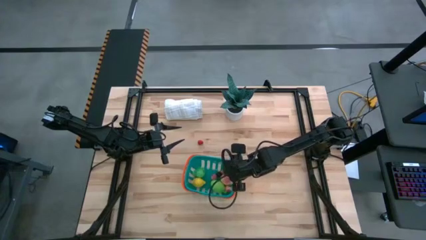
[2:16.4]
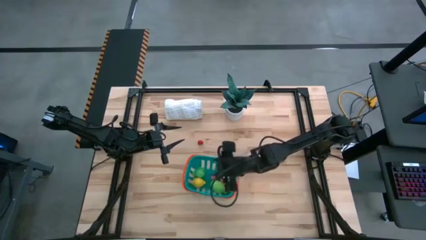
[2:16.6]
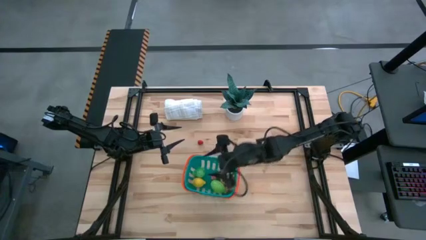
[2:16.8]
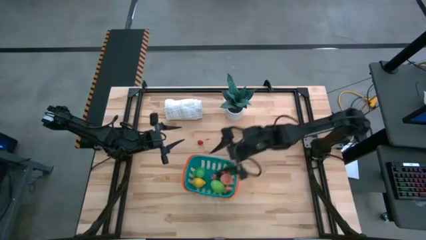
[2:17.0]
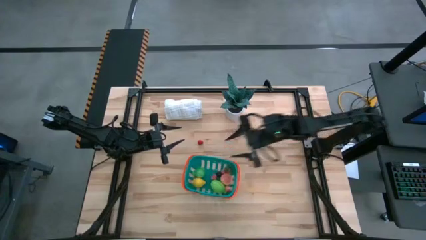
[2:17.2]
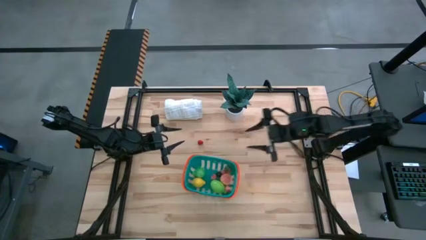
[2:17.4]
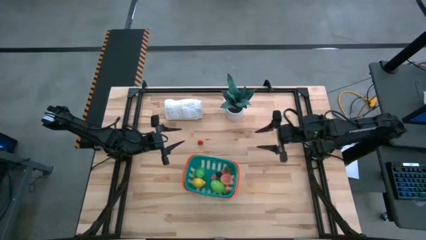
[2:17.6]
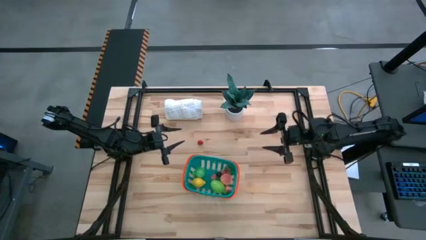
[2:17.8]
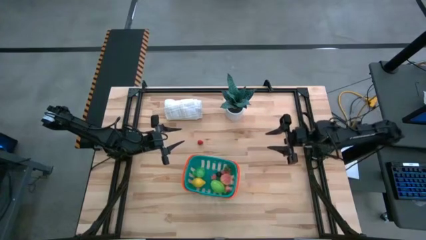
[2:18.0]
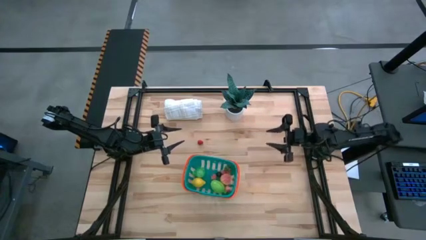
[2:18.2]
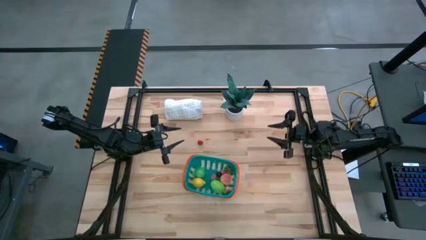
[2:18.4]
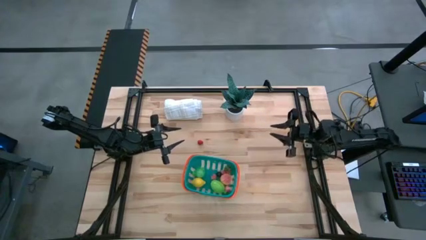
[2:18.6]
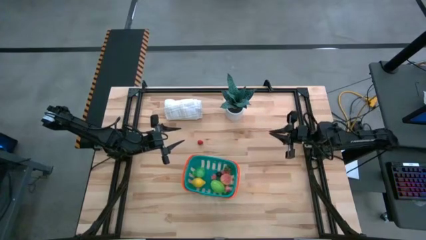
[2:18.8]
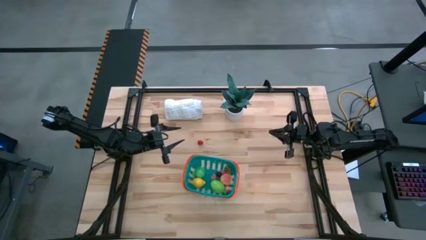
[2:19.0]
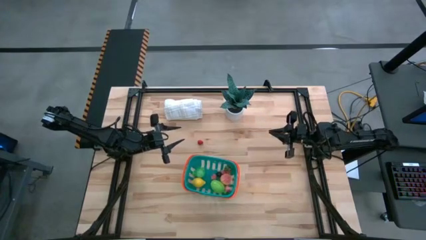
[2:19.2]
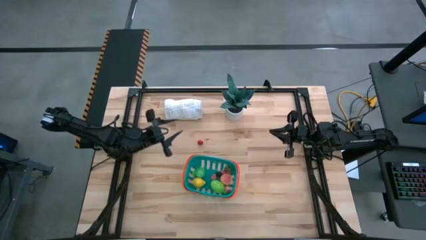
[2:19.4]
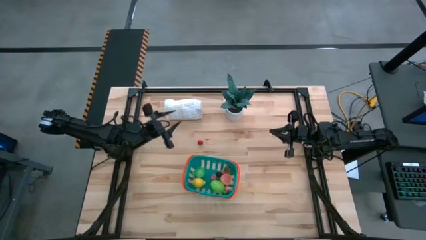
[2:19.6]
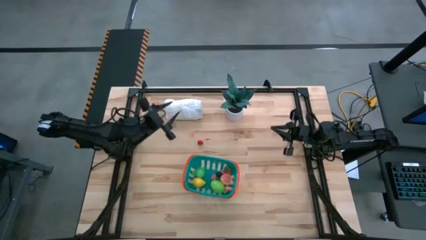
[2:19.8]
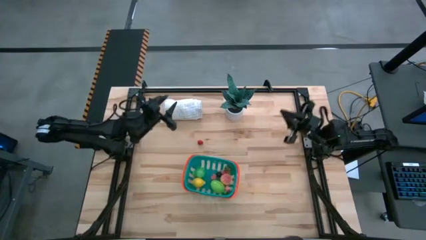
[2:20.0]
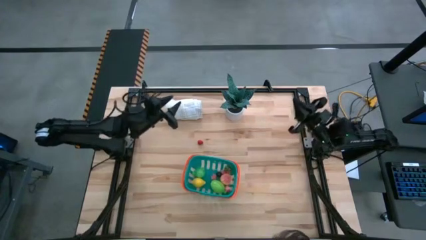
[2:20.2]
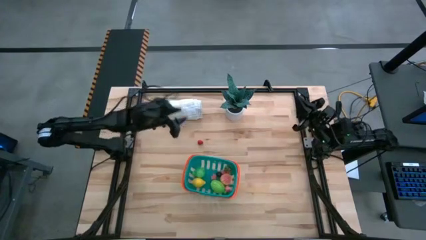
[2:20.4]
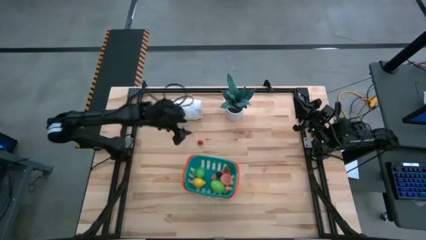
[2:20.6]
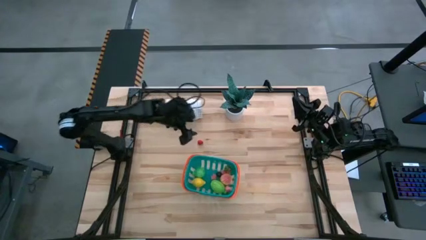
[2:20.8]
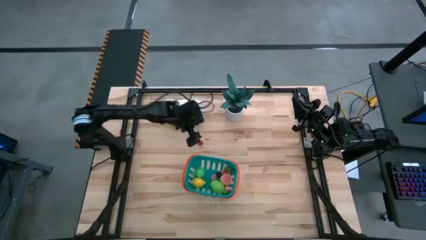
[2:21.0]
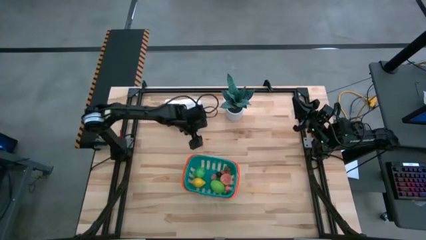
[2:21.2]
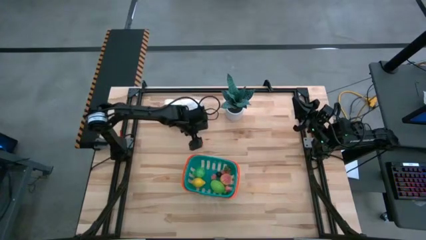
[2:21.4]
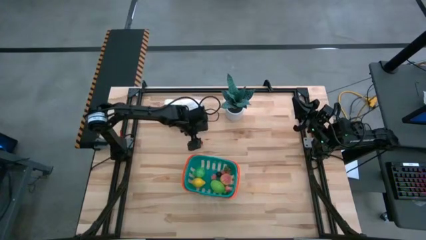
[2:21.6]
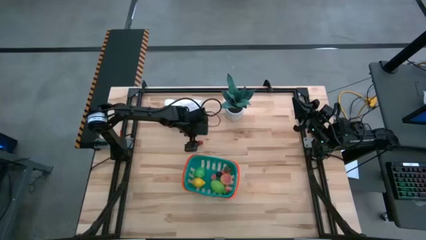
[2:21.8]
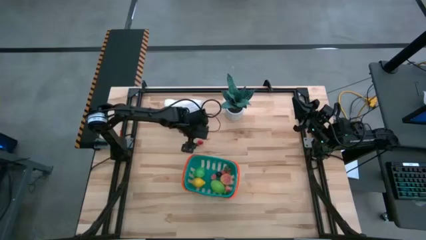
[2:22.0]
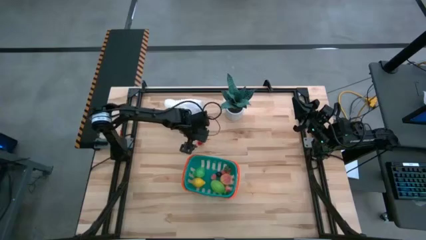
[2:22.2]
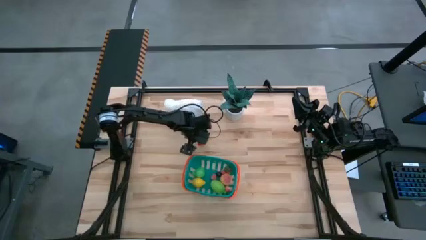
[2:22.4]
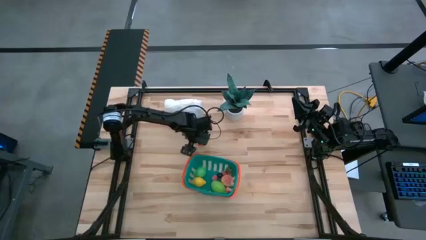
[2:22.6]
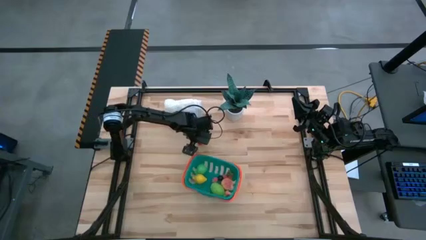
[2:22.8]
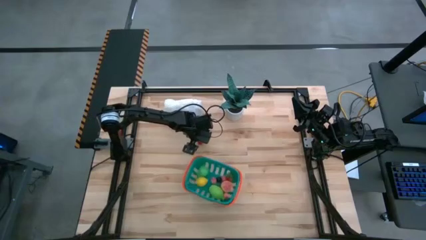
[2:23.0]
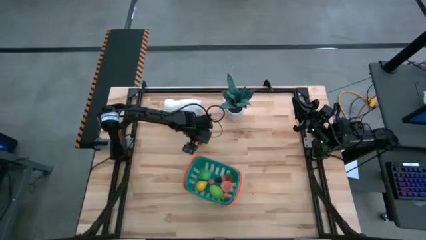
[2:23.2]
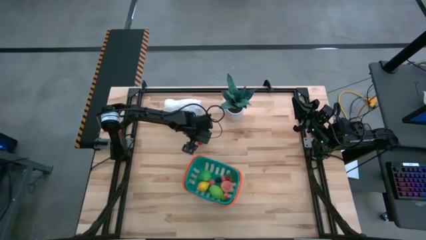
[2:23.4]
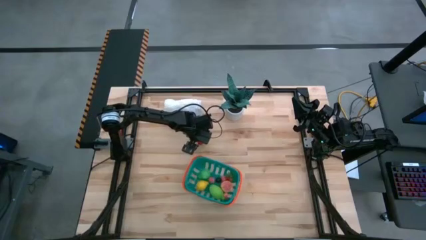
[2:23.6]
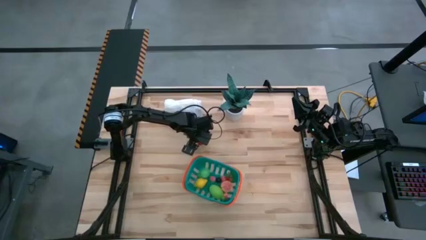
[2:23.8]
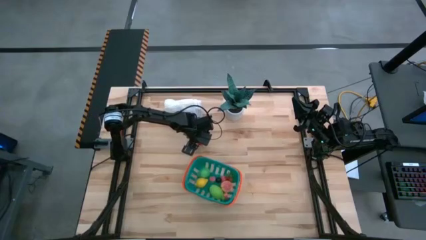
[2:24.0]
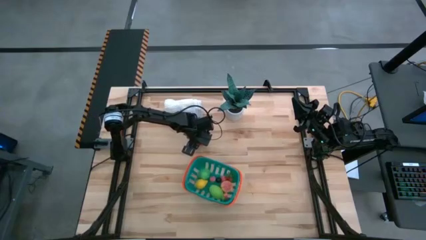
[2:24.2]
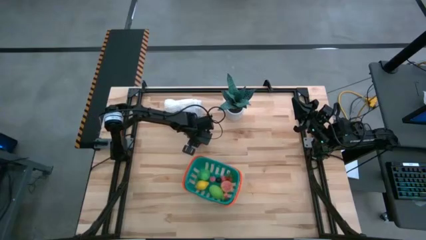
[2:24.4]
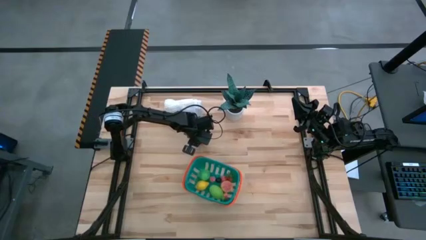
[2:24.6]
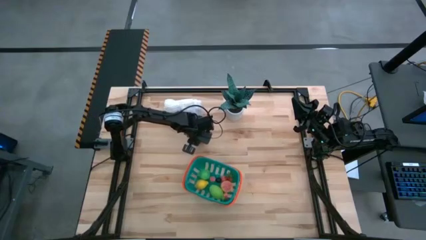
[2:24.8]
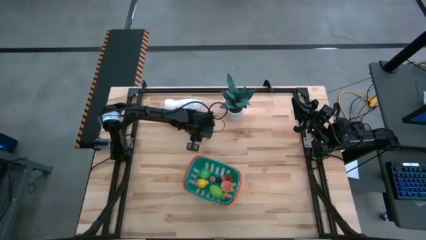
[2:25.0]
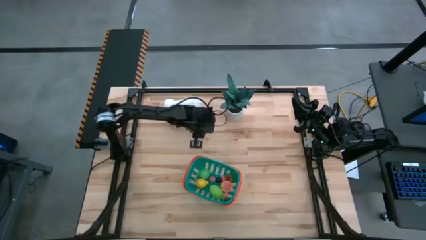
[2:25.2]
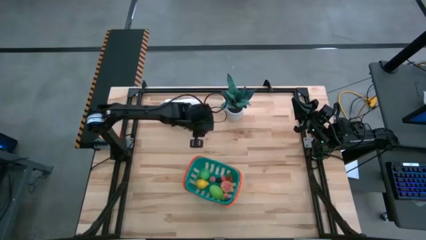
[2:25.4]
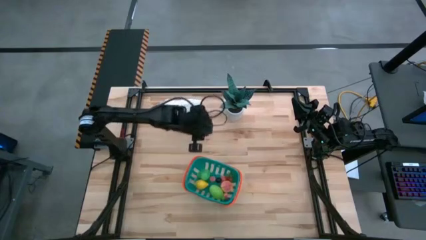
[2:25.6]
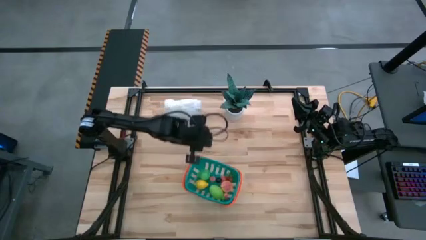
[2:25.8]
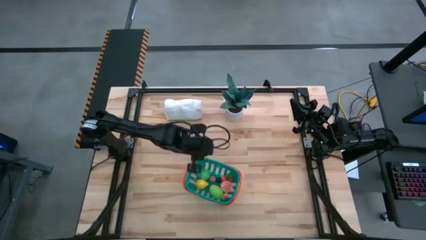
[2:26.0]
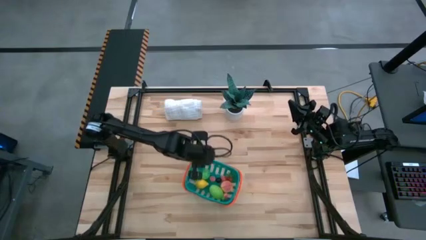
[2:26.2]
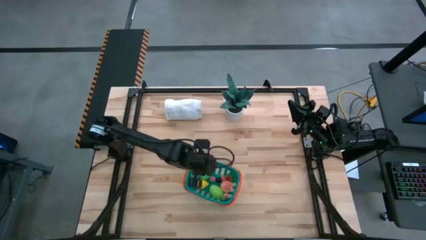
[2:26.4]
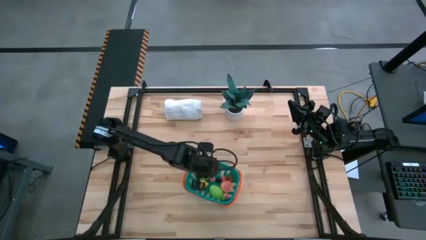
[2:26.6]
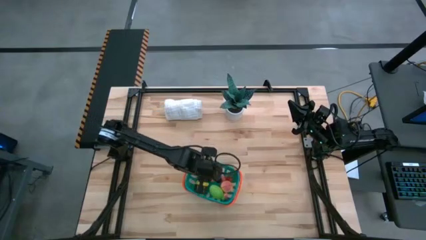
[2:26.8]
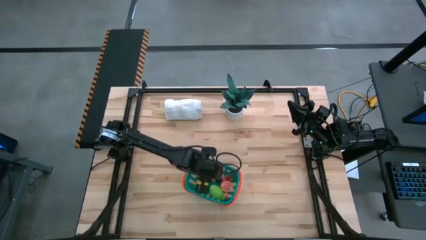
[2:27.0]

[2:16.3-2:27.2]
Task: Pick and placing Produce into tupperware
Put the red raspberry into the blue bin

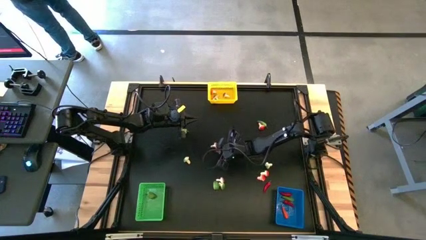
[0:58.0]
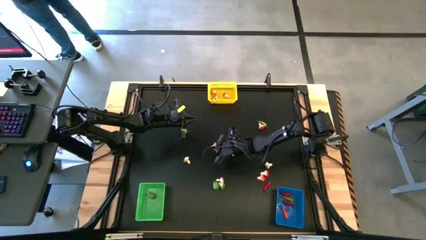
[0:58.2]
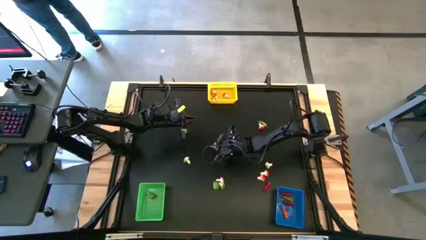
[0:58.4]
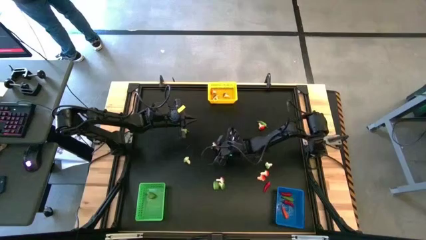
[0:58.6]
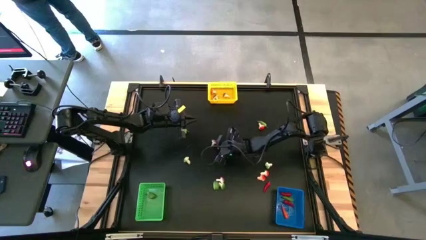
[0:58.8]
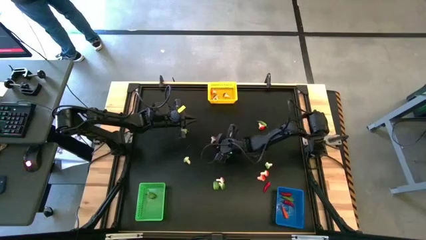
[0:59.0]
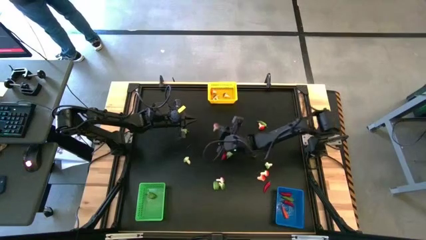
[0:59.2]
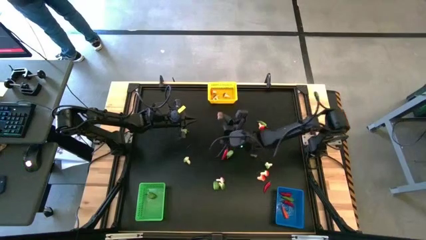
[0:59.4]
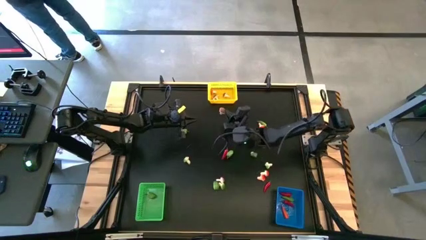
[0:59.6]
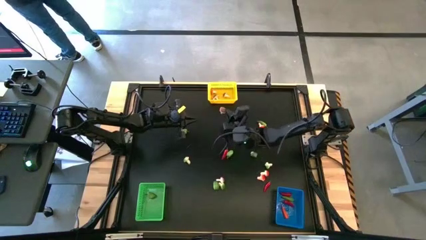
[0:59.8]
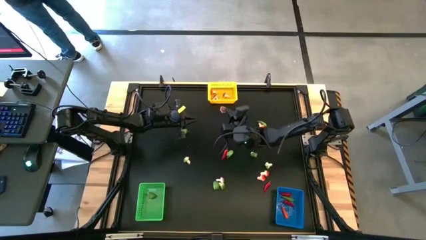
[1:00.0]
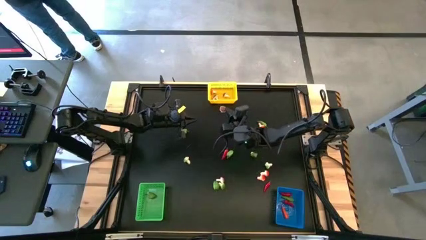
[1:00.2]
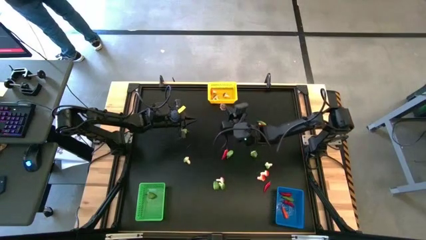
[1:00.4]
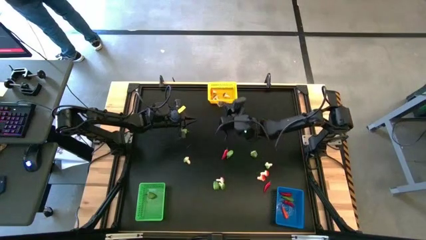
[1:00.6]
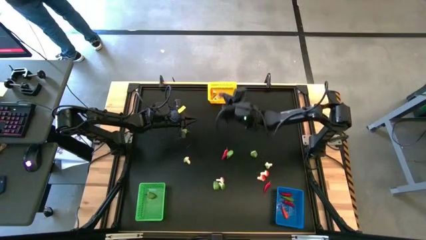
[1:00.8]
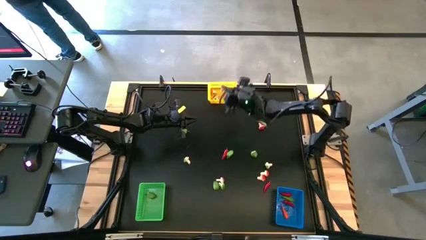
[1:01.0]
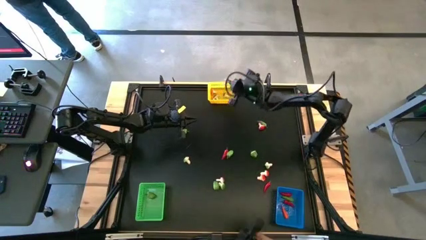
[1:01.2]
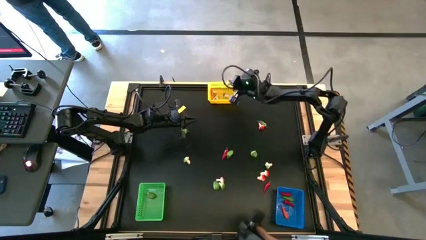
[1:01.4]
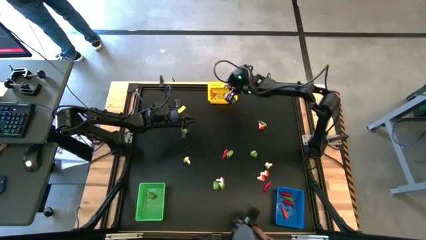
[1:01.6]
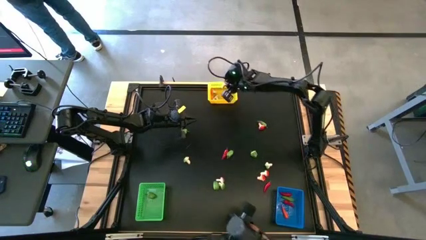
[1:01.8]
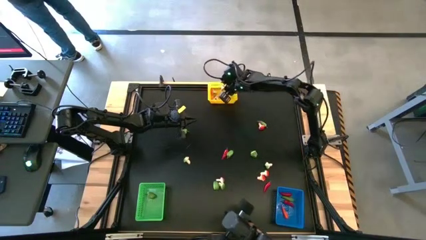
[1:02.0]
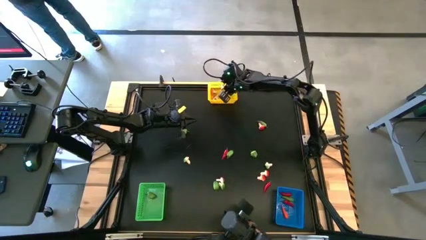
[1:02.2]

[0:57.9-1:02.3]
Task: Sort produce into baskets
Put the center red mushroom into the yellow bin
